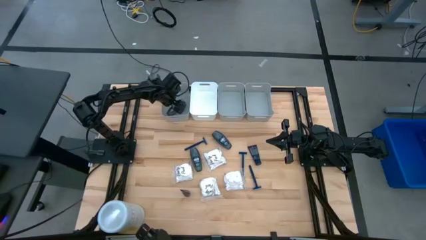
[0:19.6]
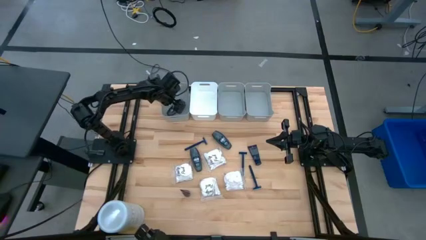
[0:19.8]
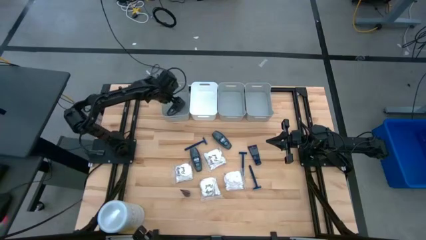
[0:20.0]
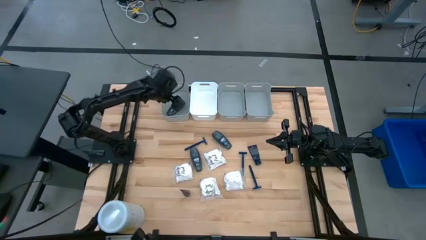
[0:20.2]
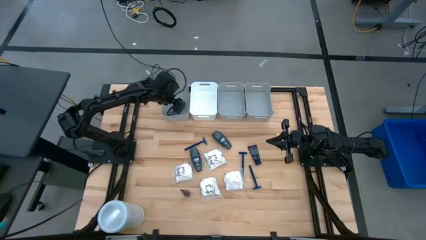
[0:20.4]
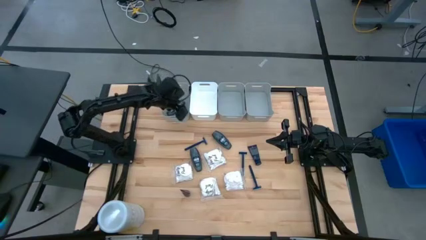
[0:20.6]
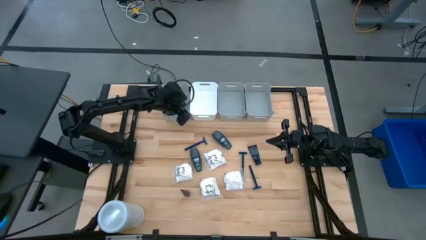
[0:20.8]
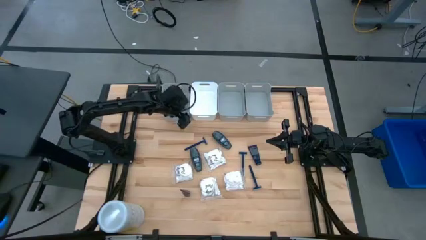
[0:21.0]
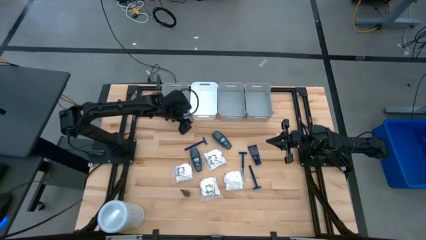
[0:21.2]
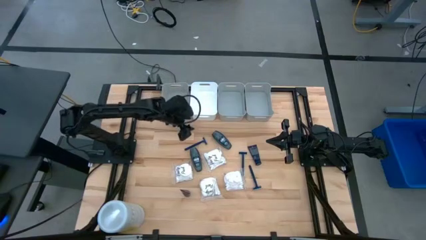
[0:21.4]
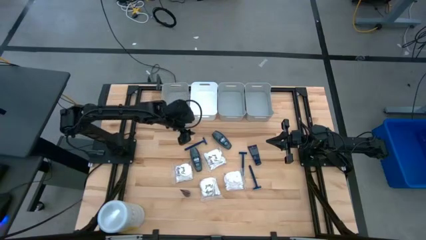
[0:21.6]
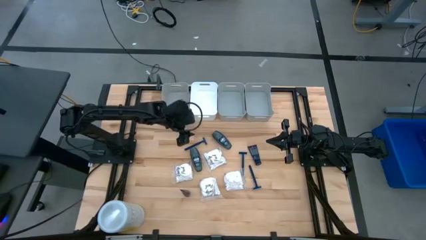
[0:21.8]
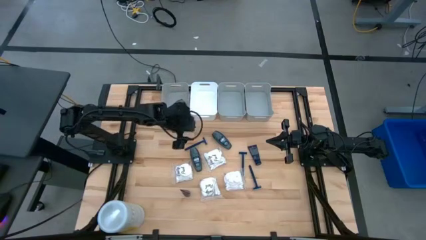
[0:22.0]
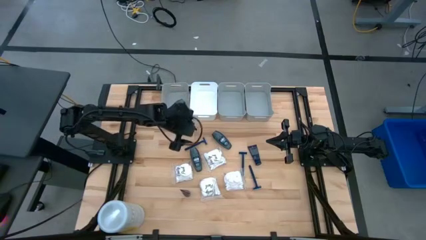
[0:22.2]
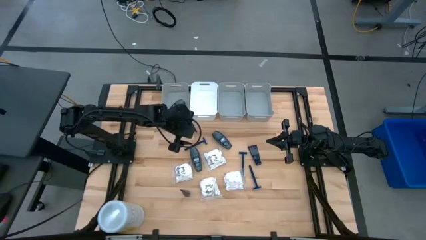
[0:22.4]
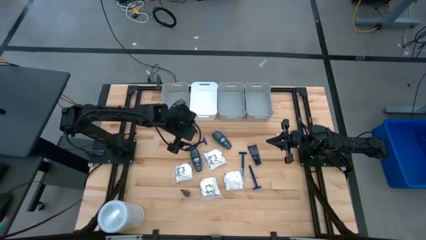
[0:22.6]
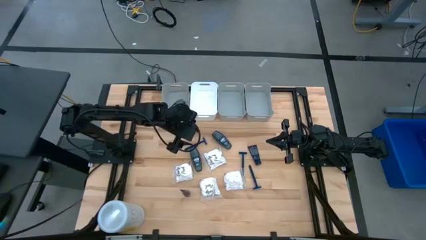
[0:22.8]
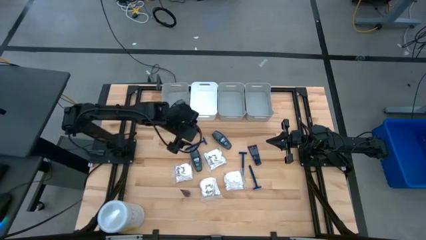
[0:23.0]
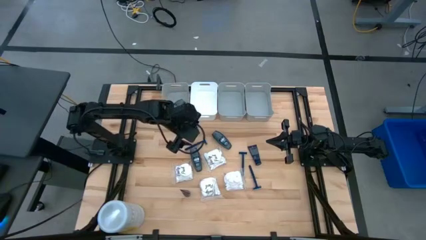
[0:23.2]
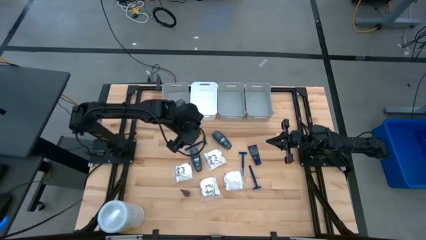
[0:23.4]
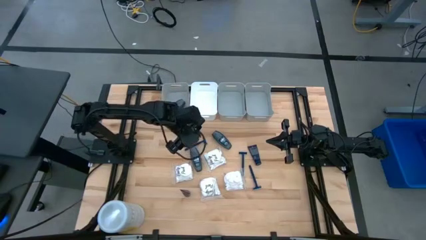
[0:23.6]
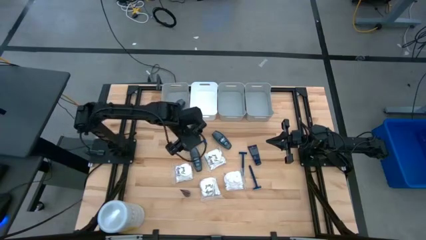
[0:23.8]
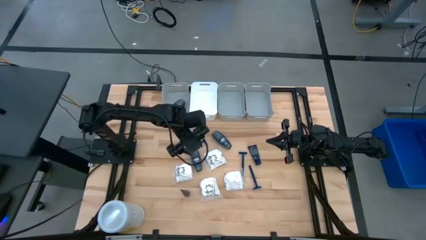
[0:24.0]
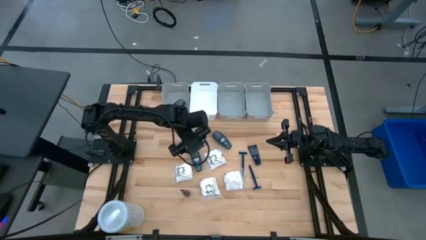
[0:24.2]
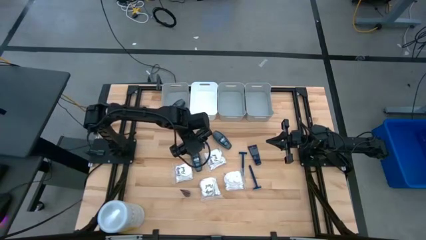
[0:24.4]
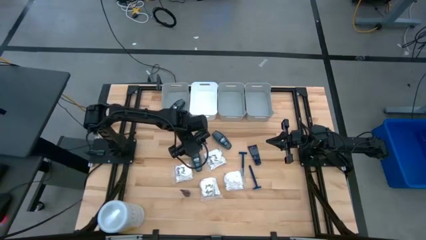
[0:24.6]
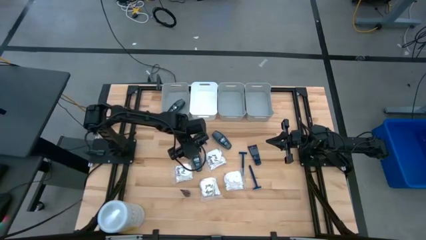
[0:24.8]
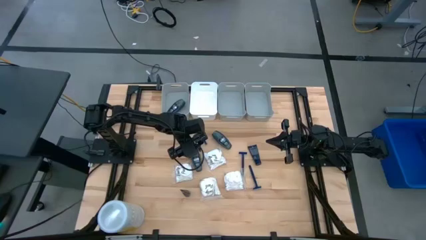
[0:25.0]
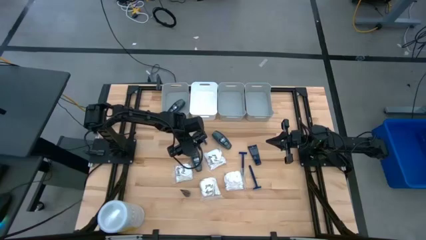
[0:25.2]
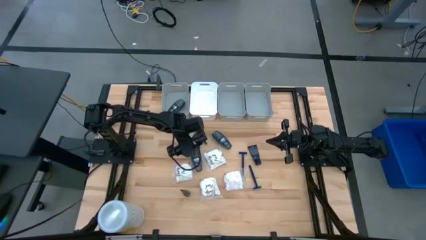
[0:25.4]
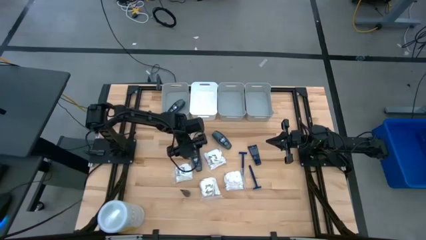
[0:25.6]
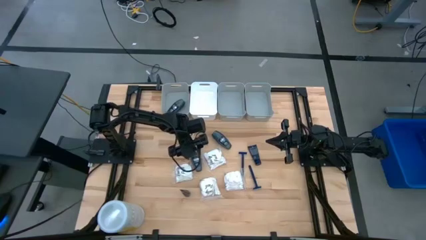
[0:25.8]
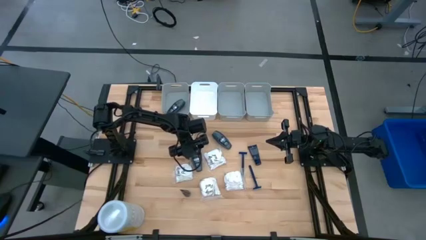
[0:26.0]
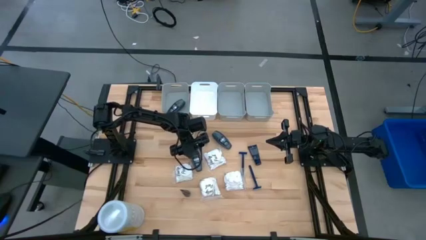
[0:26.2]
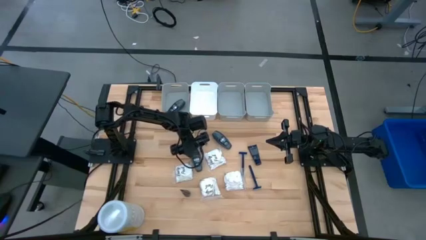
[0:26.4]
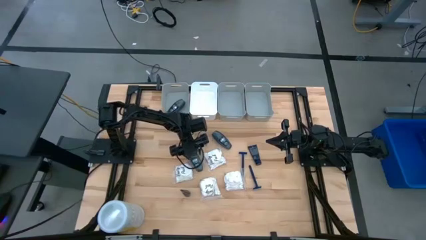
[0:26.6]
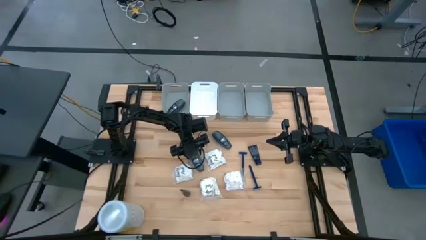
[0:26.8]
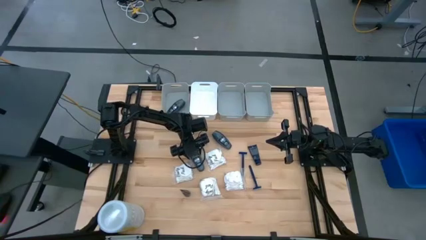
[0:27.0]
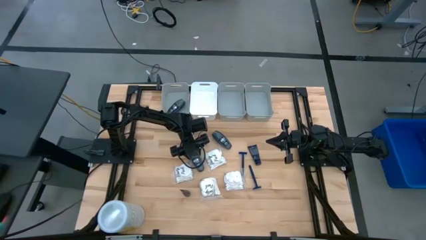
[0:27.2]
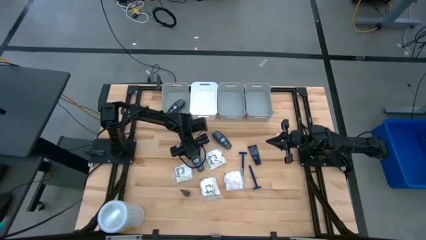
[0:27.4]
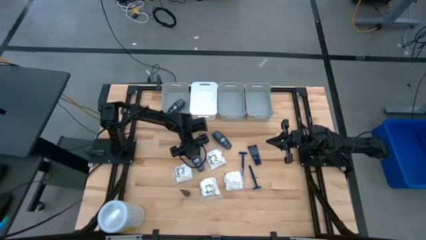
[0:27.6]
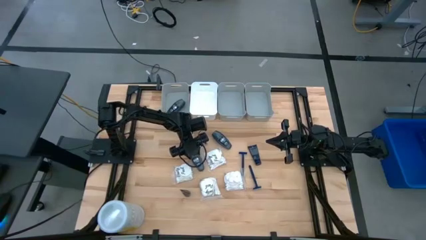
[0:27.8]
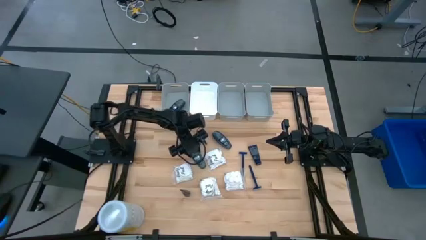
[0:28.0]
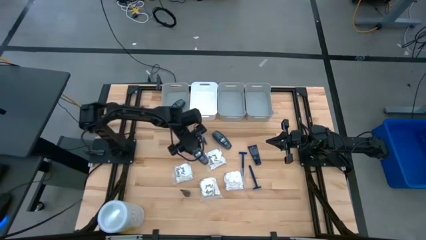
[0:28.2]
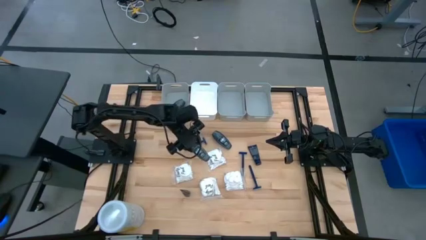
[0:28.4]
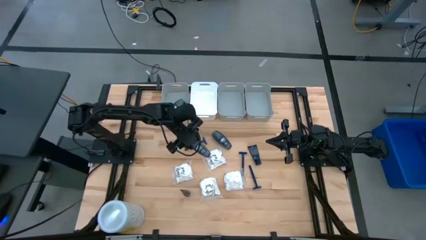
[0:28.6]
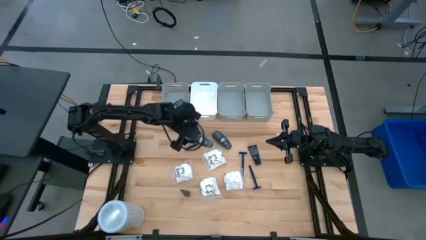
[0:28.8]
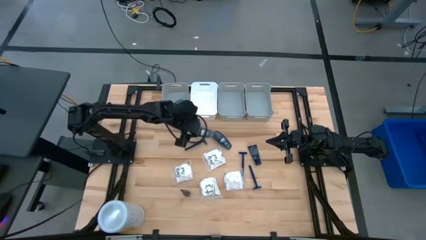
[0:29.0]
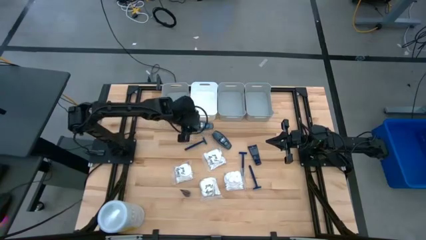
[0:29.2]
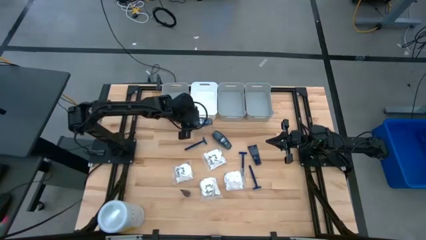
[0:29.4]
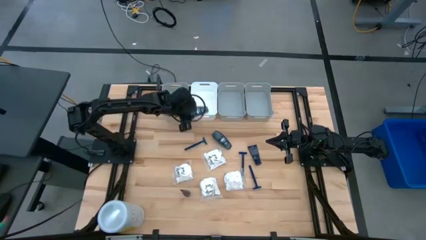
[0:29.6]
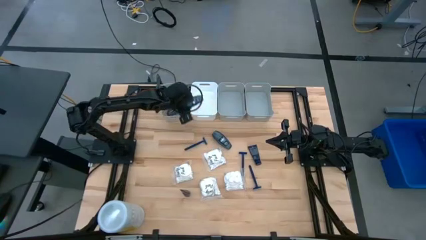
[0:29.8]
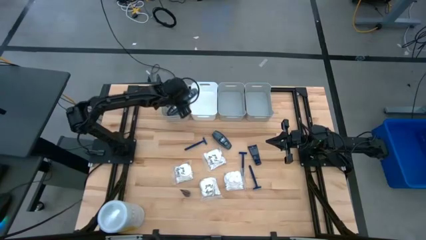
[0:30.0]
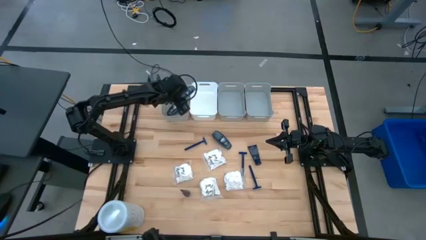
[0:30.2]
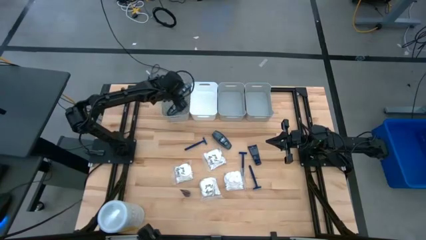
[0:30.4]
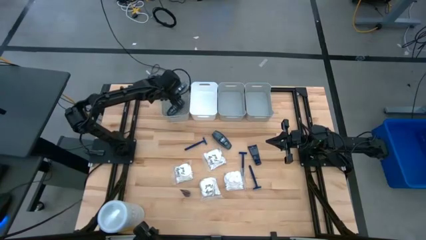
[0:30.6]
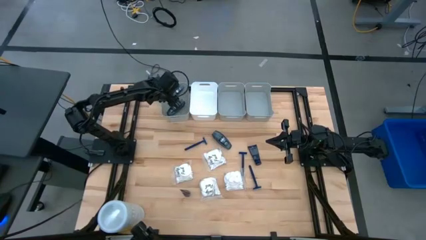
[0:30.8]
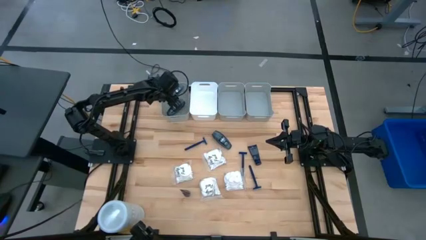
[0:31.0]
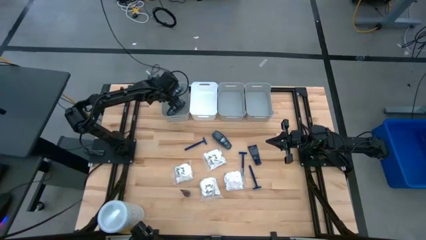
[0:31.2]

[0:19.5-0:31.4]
Task: Pick & Place Travel size toiletries
Put the gray deodorant into the left gray bin
